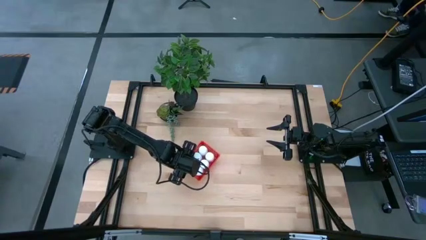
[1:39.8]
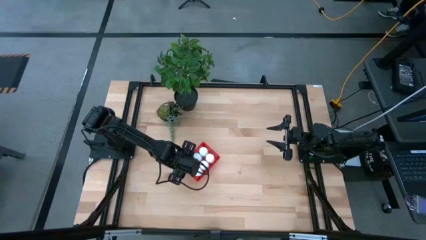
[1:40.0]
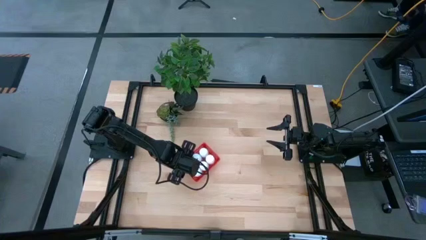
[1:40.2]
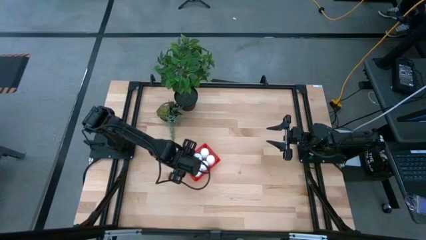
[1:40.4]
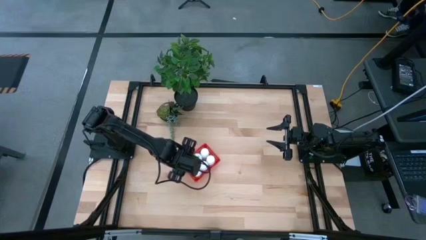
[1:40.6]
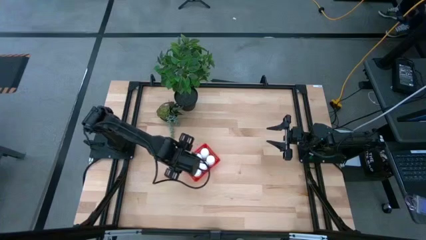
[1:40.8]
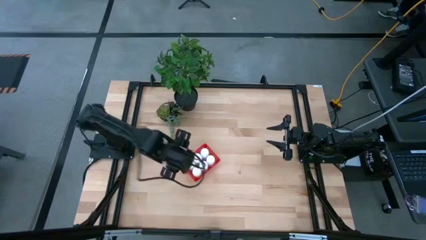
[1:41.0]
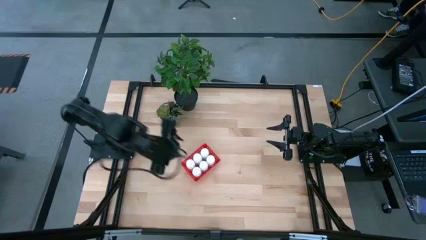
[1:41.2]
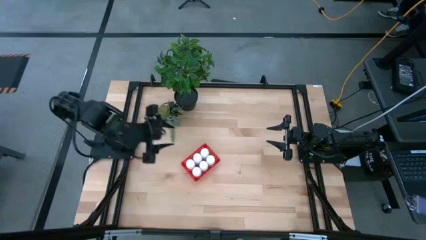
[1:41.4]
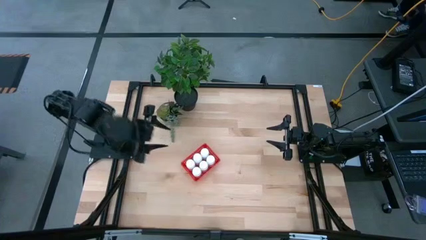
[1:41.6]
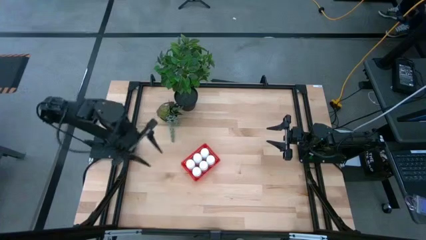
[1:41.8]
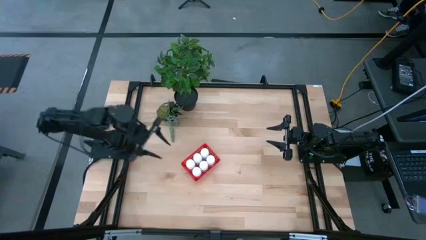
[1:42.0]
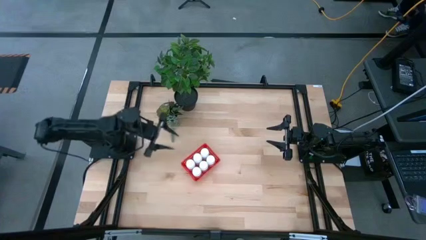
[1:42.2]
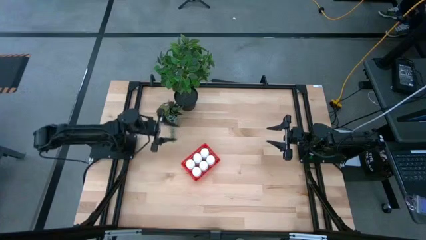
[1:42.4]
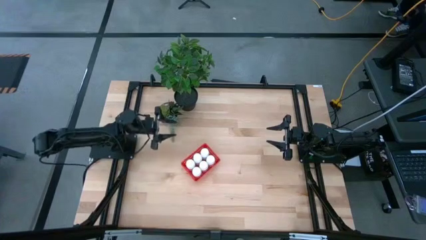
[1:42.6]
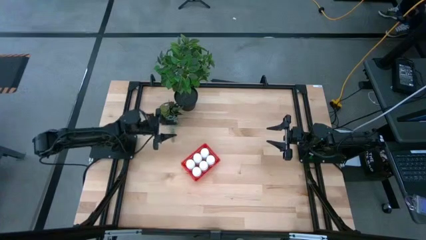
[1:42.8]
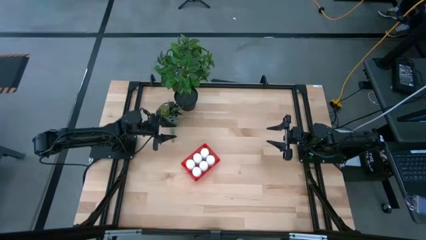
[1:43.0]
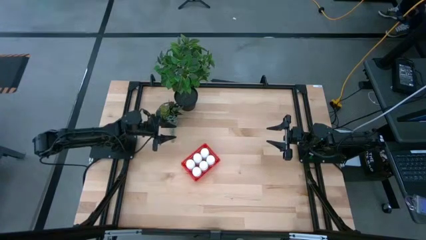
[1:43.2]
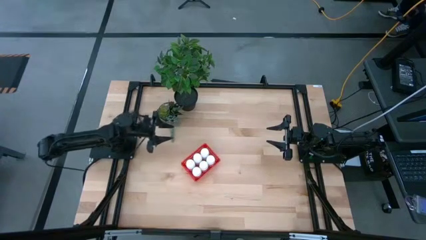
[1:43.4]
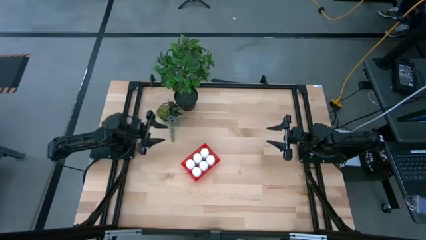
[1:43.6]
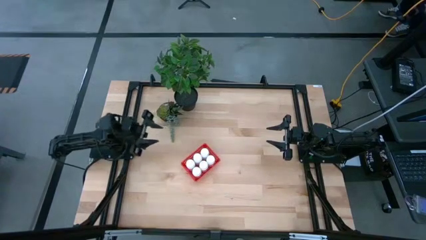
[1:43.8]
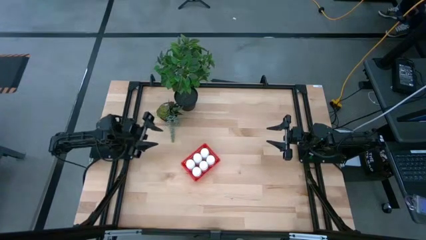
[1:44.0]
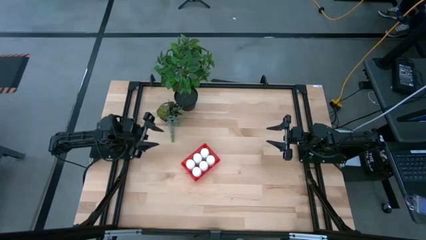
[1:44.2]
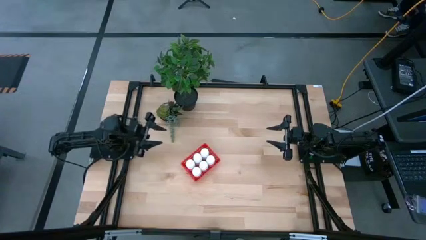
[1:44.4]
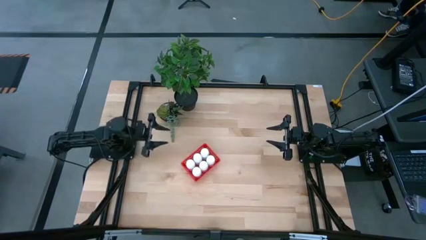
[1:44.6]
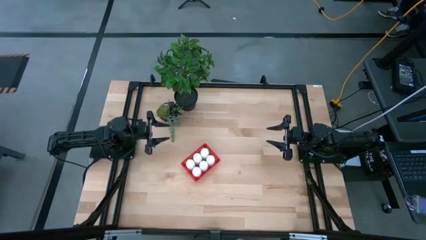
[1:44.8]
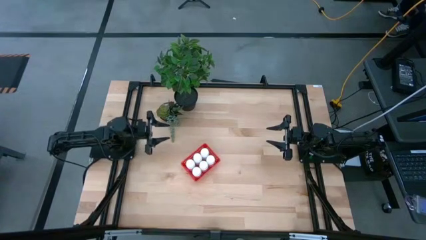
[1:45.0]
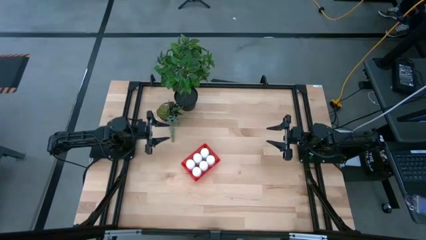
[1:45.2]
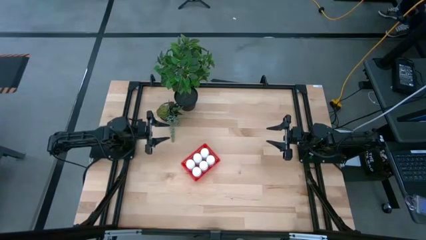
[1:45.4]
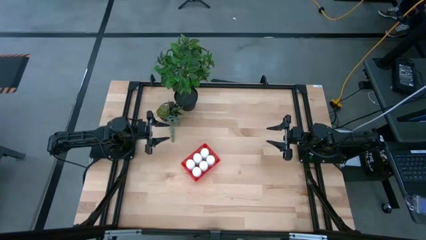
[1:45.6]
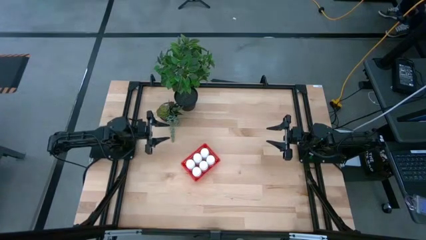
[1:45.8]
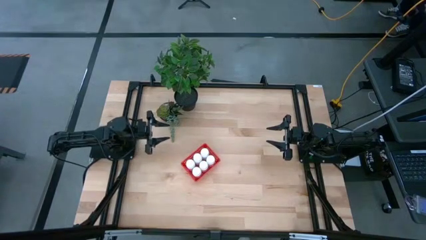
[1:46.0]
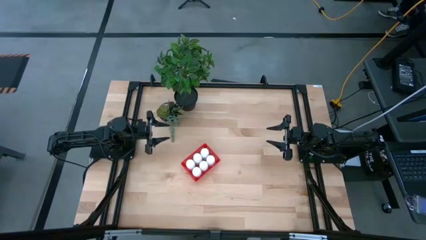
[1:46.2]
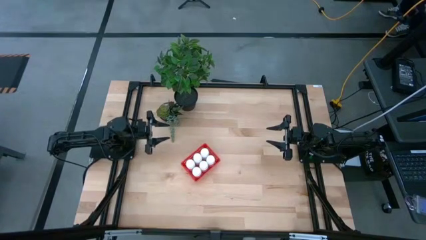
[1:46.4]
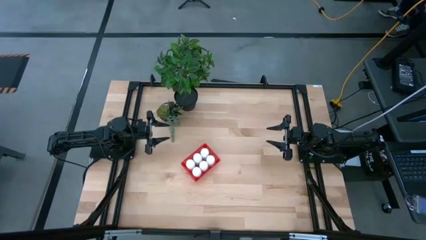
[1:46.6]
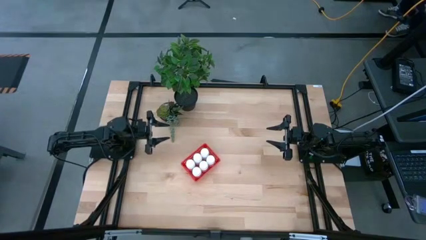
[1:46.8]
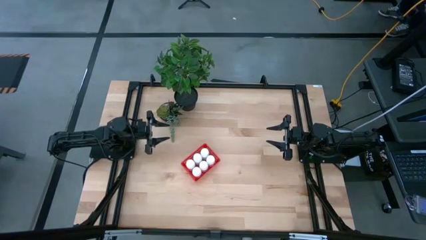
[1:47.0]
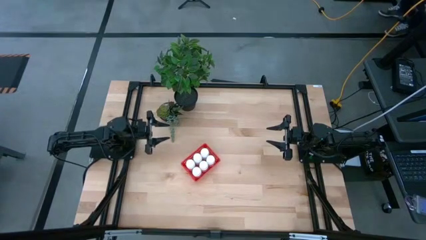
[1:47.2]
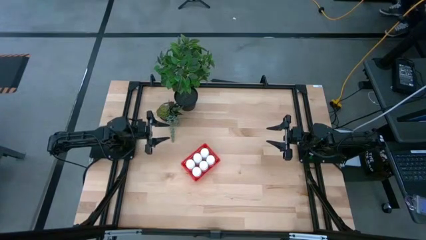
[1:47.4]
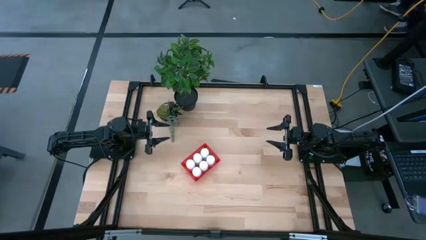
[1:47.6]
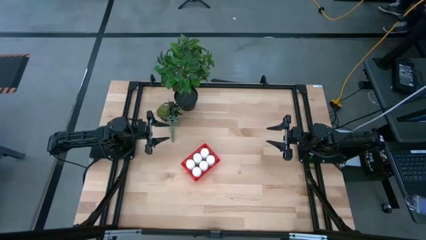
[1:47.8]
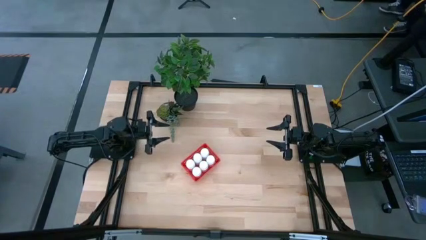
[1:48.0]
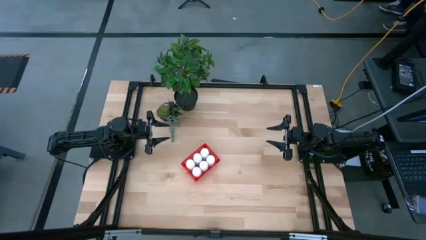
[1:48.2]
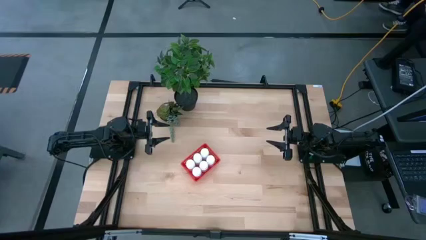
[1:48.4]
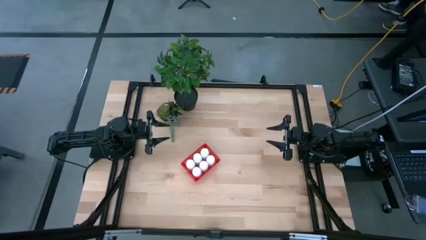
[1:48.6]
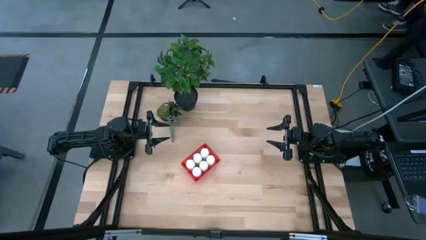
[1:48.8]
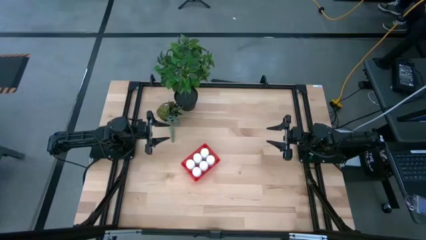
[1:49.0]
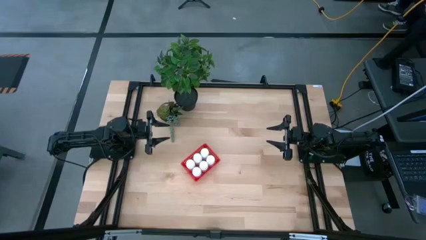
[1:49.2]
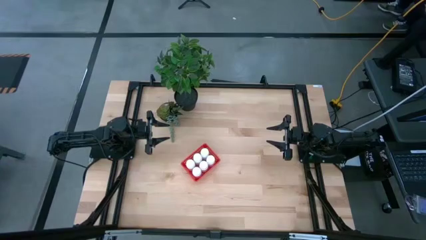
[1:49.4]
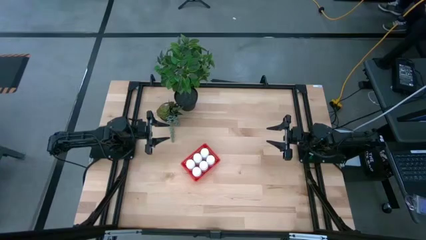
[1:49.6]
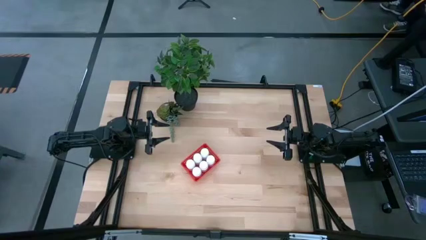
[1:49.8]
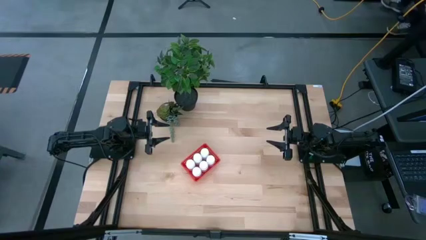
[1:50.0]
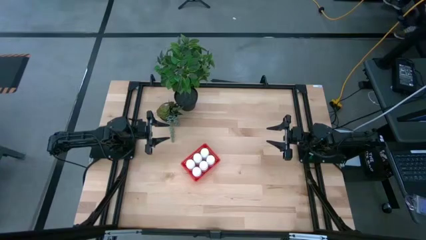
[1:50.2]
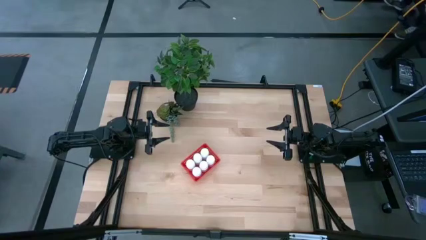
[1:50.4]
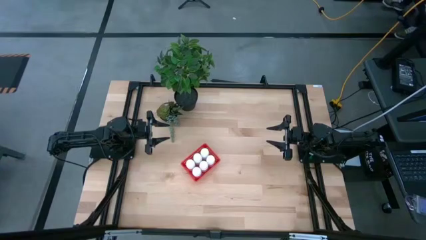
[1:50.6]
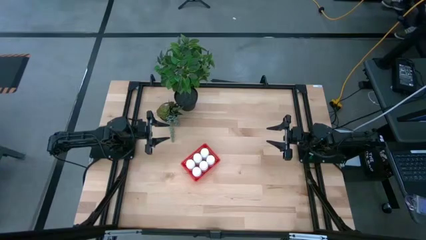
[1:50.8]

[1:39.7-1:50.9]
Task: Pick and place pill bottles into a basket
Return to Home Position

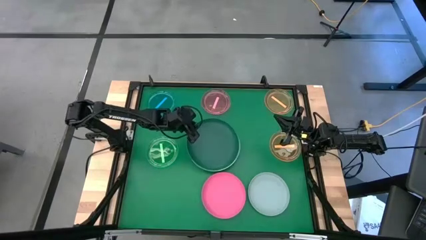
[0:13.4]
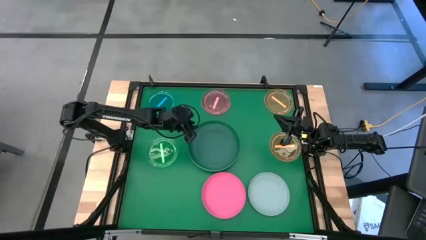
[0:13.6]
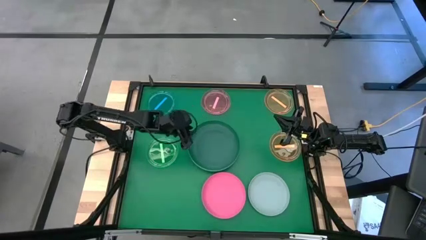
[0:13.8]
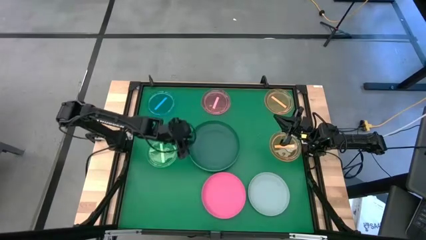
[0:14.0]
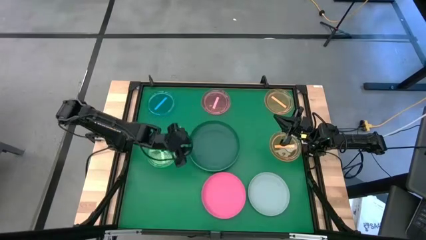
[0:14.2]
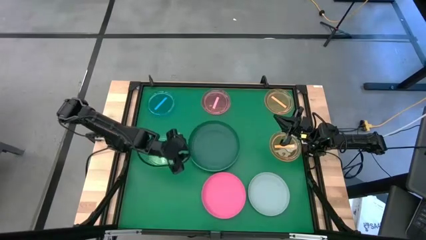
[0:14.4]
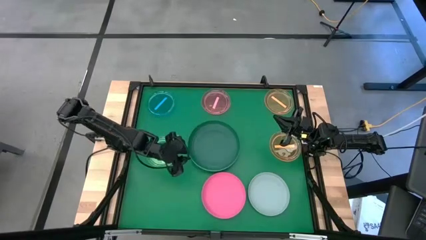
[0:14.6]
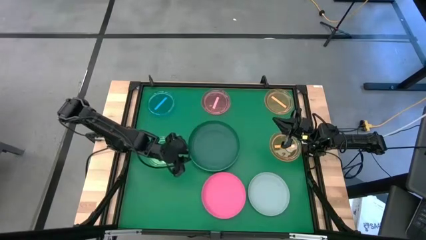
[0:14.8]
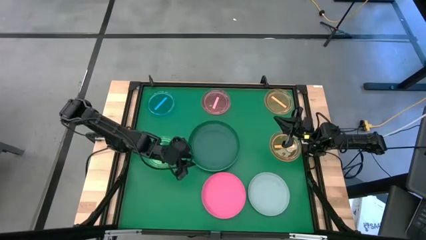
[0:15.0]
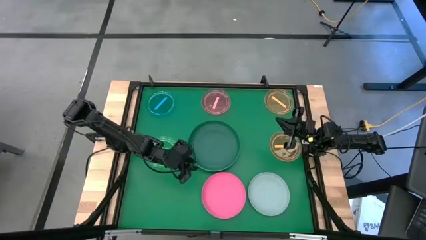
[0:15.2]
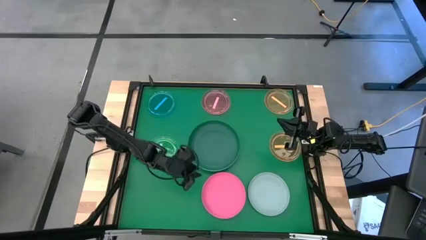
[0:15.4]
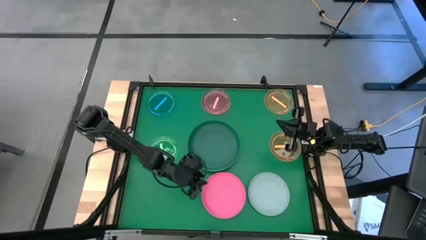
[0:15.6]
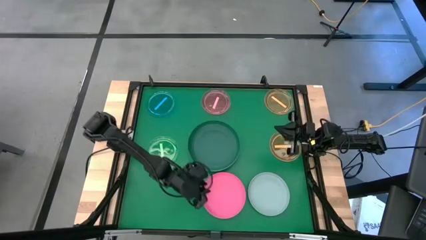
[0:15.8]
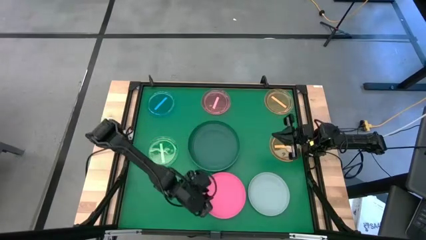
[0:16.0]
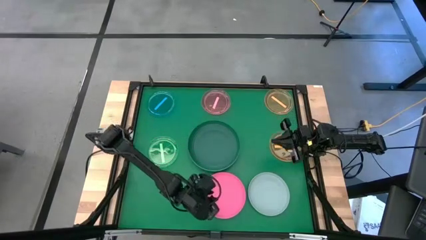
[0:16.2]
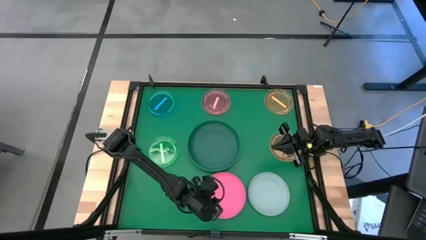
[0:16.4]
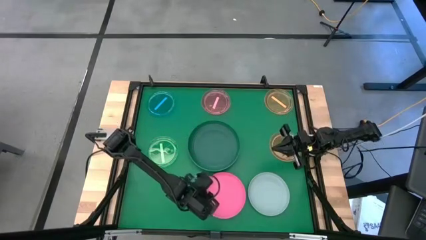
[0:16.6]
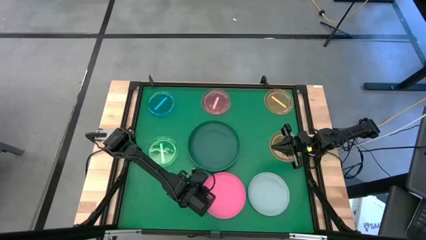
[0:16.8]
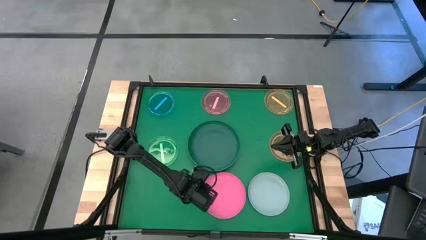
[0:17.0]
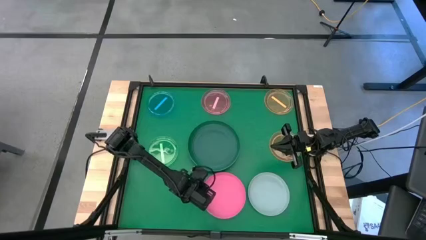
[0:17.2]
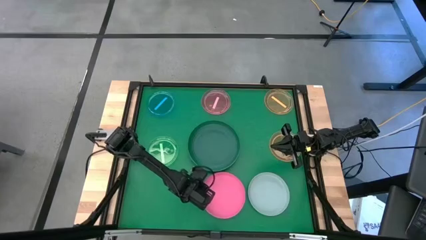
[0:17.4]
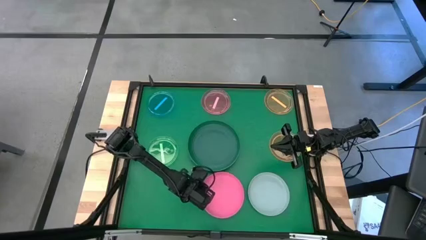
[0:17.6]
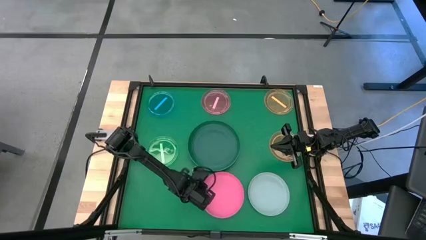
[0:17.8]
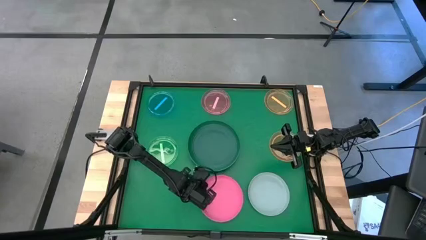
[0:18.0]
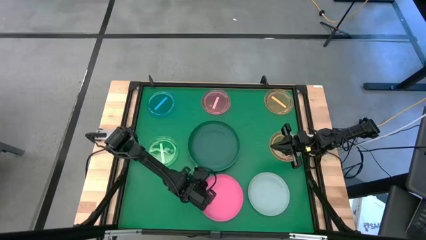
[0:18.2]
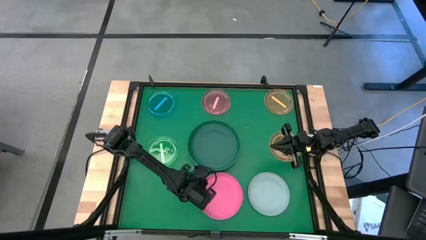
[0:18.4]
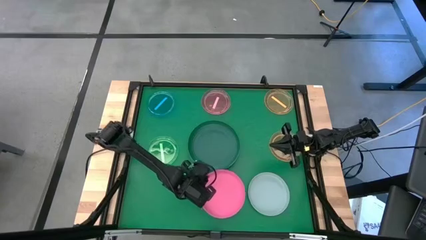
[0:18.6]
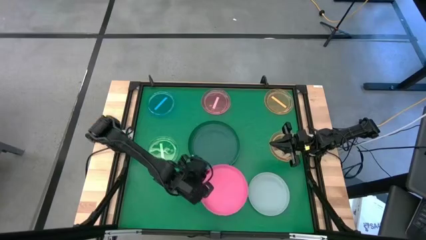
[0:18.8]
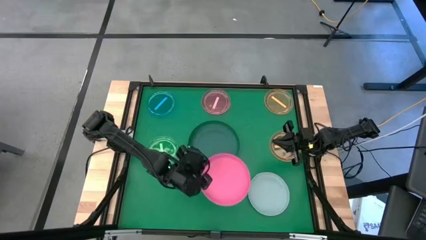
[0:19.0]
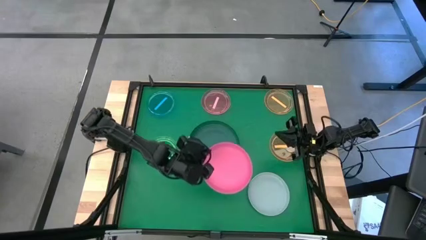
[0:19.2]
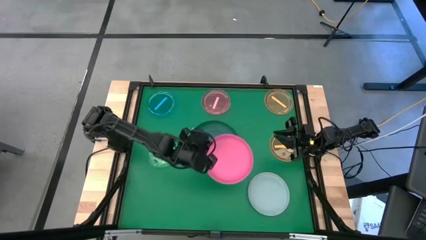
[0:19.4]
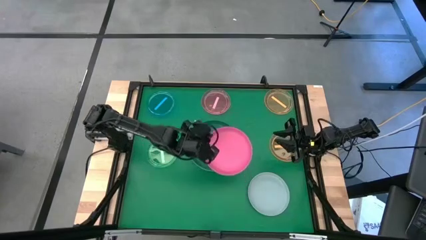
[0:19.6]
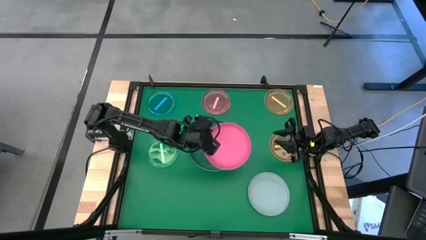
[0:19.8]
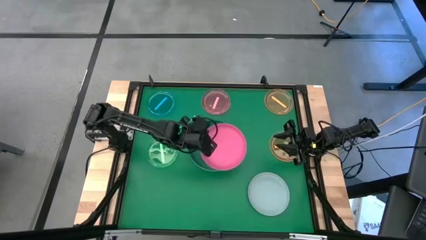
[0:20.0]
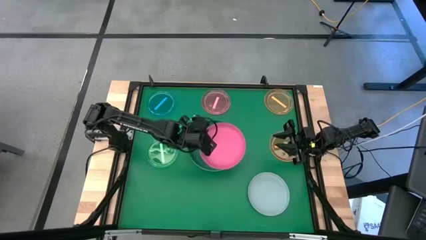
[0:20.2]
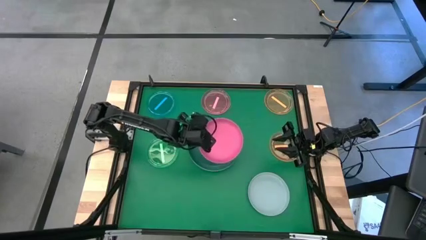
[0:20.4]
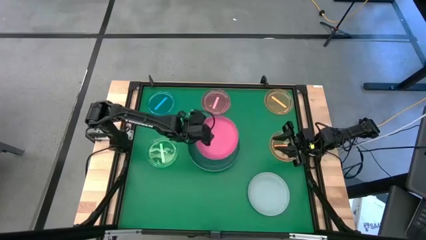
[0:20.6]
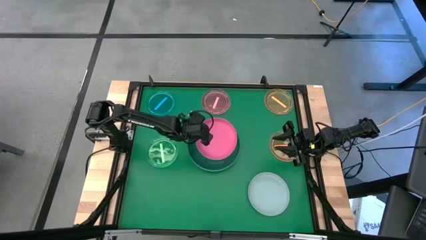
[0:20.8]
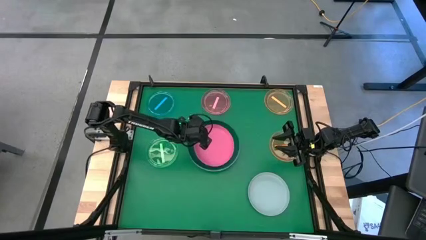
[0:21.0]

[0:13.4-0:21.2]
Task: Stack plastic plates
Stack the pink plate on top of the dark green plate
